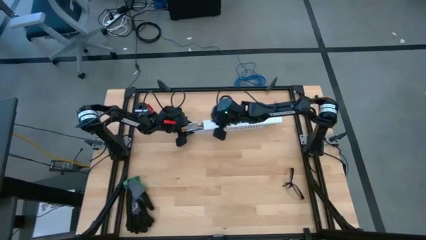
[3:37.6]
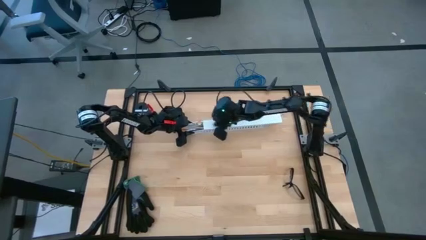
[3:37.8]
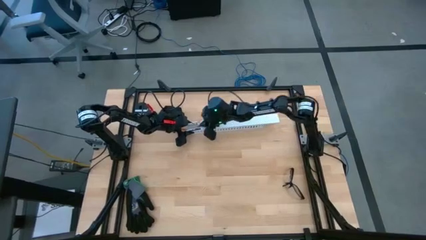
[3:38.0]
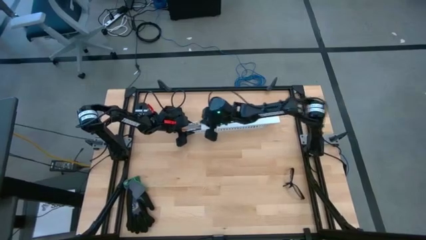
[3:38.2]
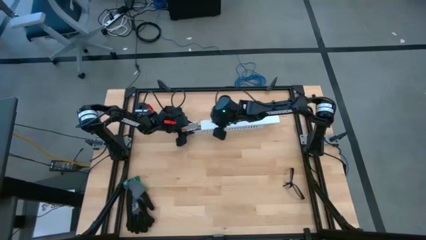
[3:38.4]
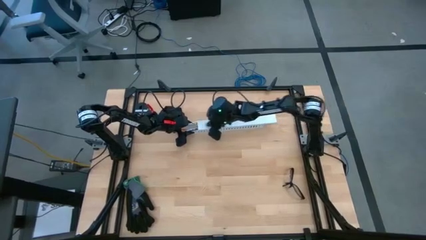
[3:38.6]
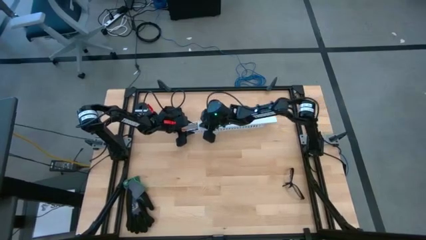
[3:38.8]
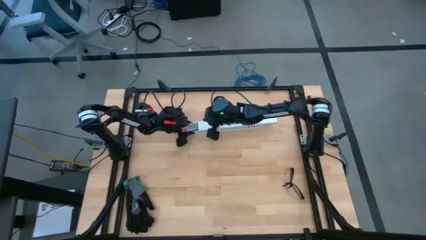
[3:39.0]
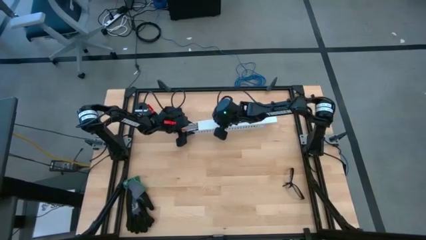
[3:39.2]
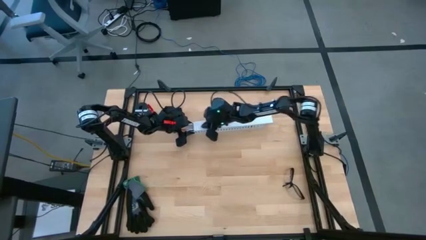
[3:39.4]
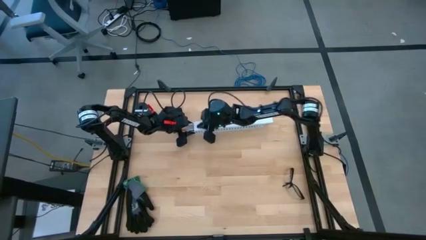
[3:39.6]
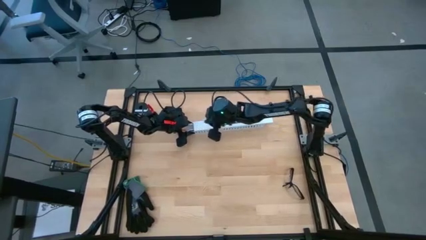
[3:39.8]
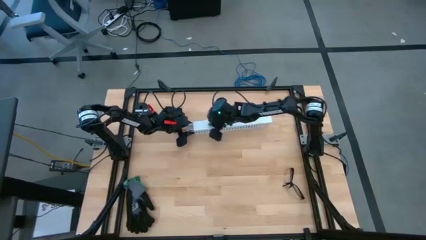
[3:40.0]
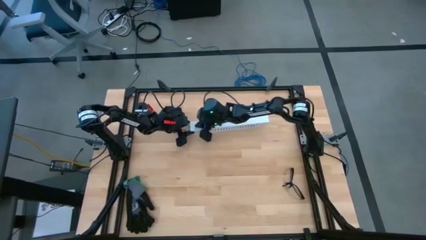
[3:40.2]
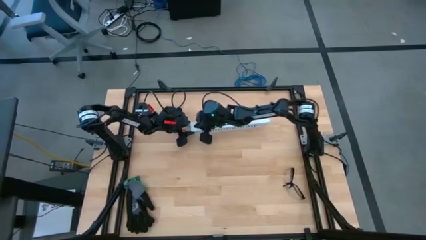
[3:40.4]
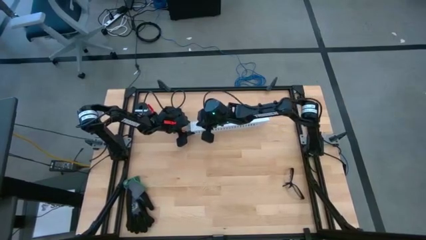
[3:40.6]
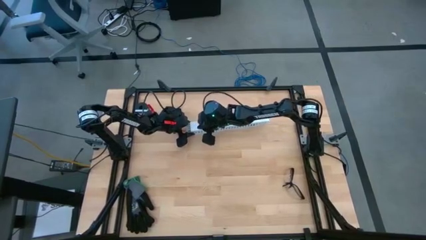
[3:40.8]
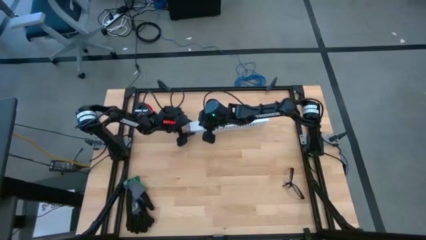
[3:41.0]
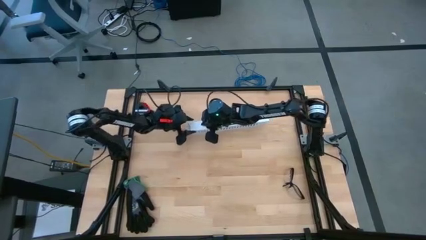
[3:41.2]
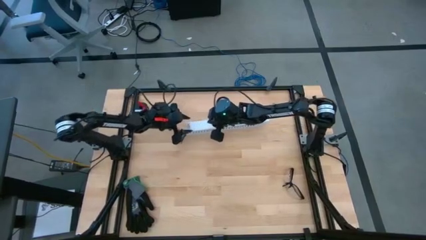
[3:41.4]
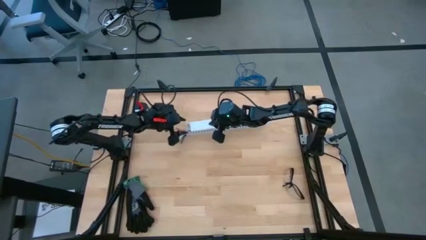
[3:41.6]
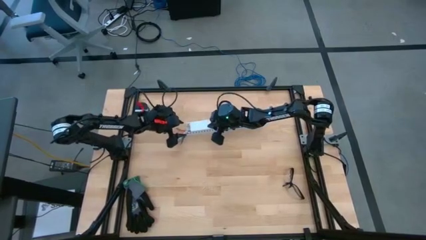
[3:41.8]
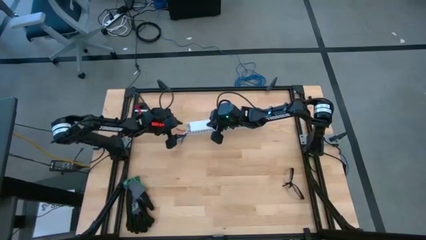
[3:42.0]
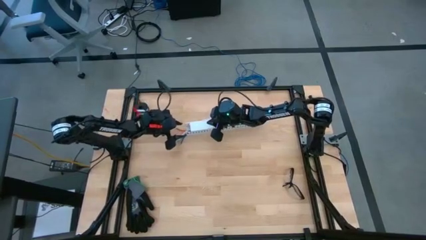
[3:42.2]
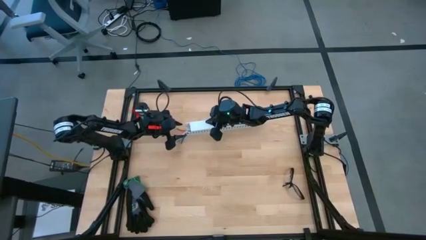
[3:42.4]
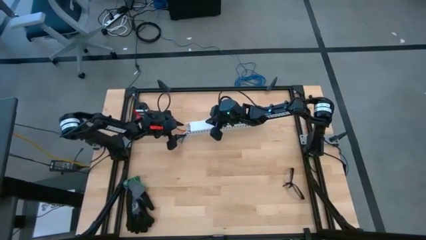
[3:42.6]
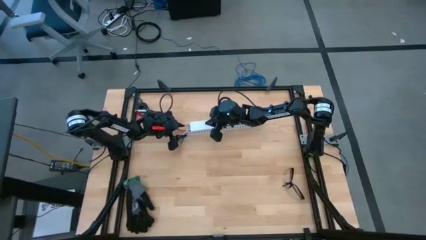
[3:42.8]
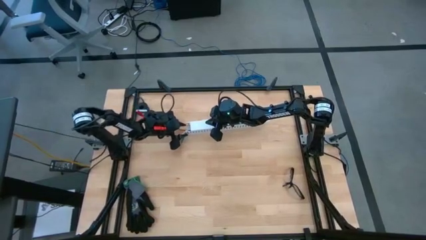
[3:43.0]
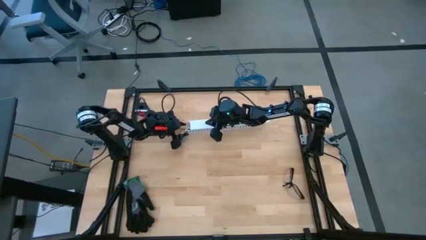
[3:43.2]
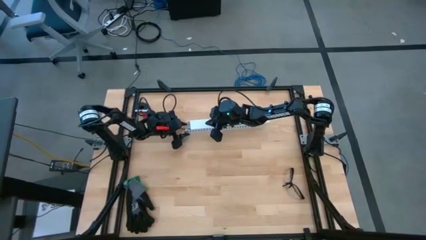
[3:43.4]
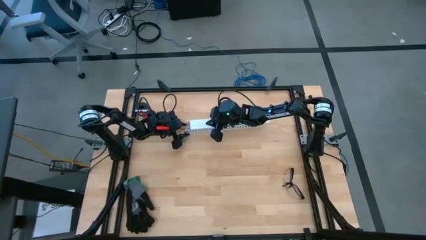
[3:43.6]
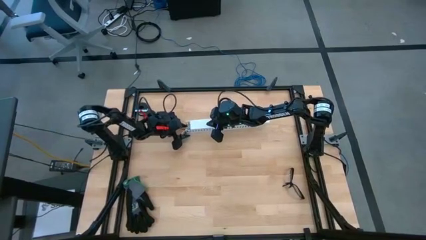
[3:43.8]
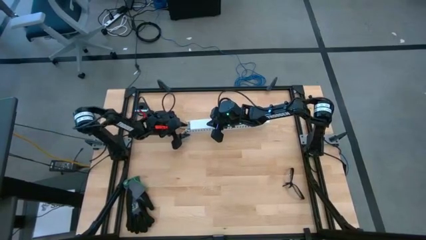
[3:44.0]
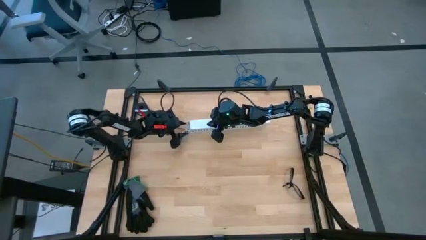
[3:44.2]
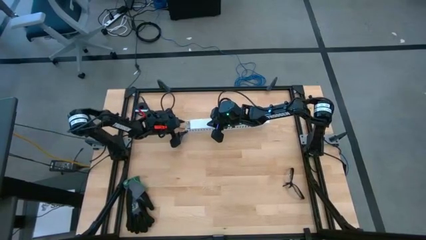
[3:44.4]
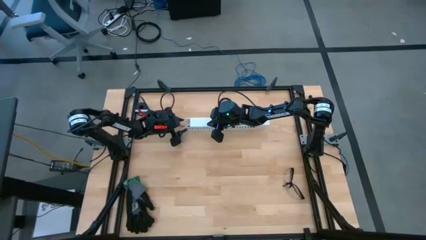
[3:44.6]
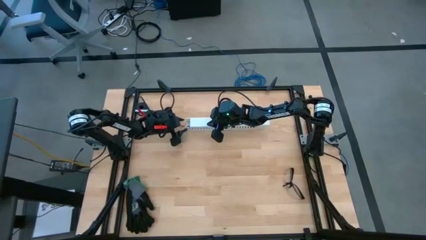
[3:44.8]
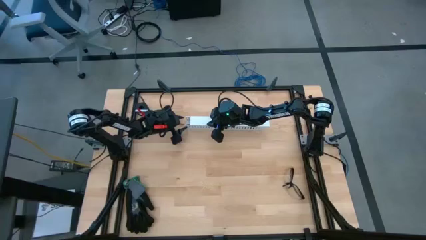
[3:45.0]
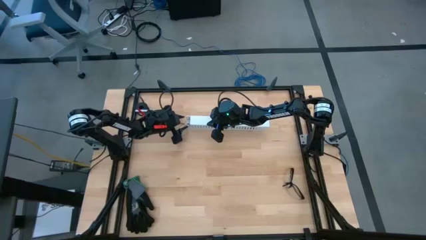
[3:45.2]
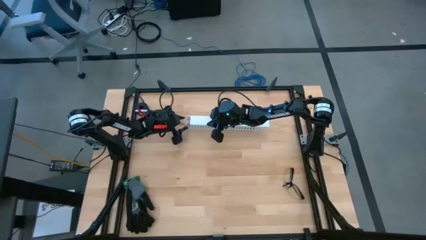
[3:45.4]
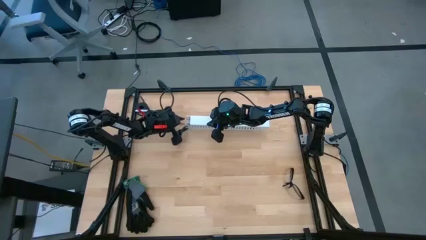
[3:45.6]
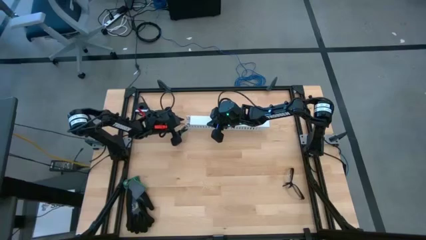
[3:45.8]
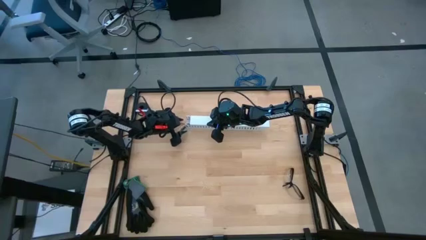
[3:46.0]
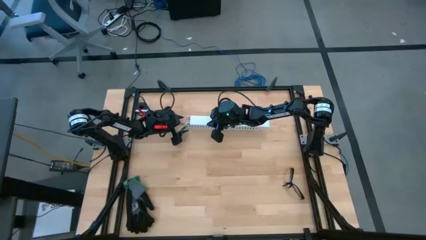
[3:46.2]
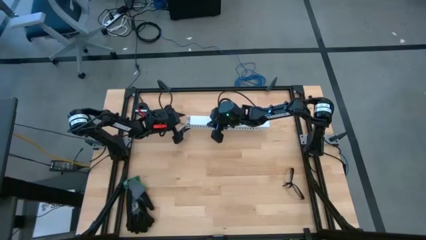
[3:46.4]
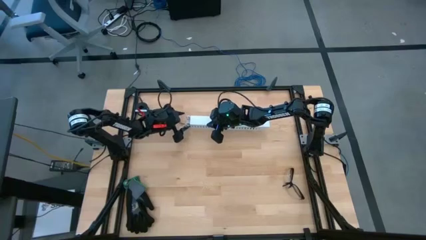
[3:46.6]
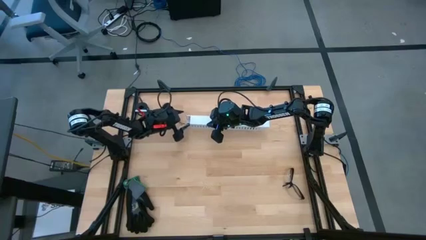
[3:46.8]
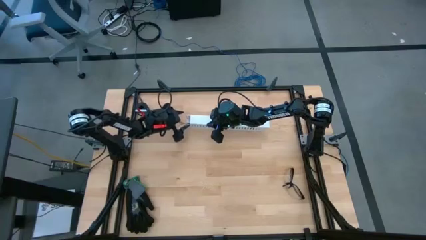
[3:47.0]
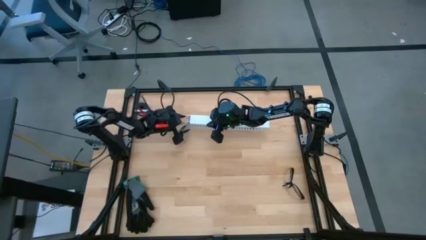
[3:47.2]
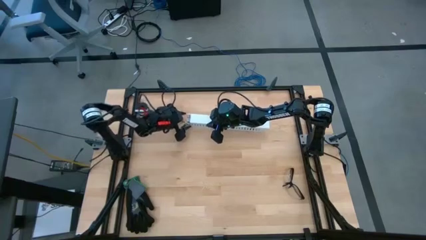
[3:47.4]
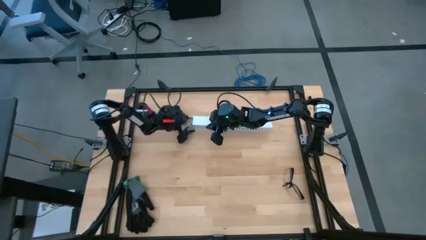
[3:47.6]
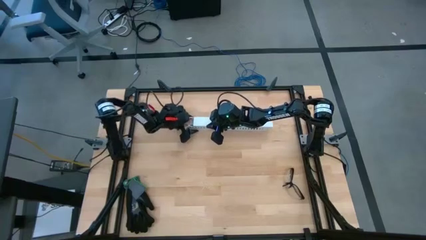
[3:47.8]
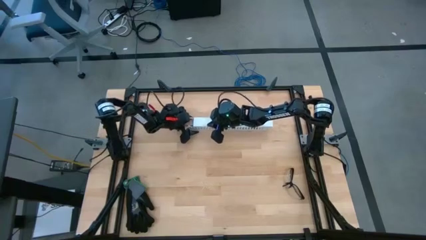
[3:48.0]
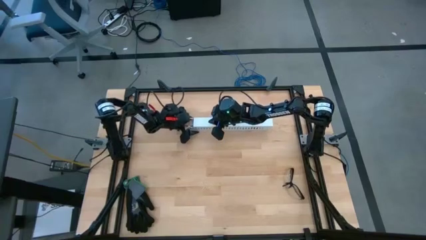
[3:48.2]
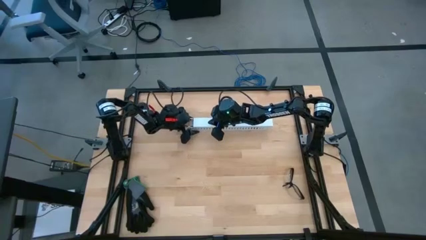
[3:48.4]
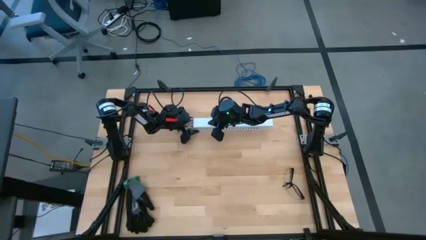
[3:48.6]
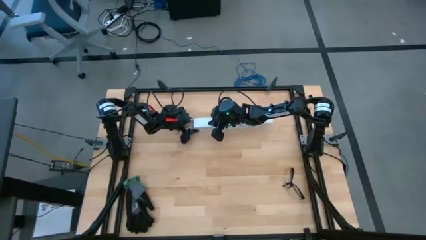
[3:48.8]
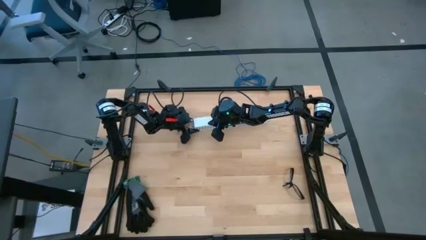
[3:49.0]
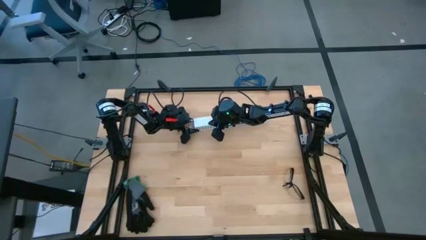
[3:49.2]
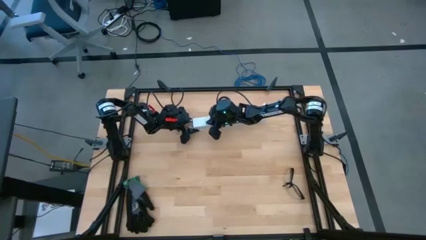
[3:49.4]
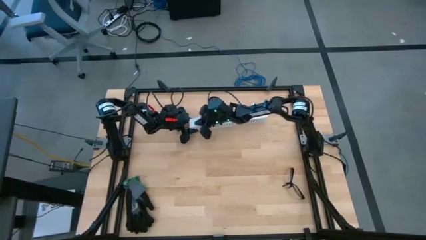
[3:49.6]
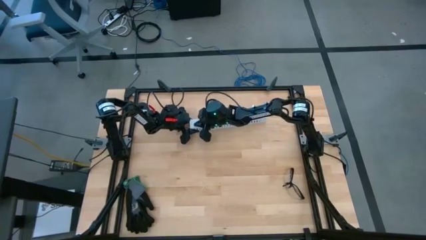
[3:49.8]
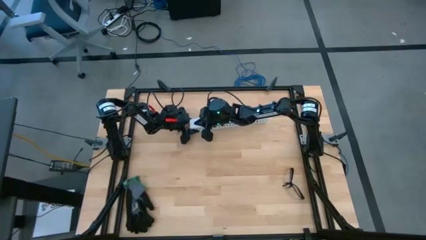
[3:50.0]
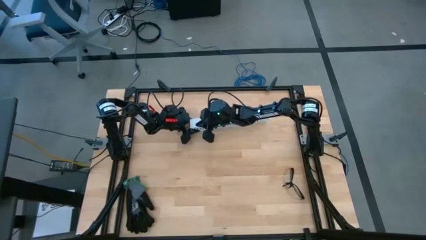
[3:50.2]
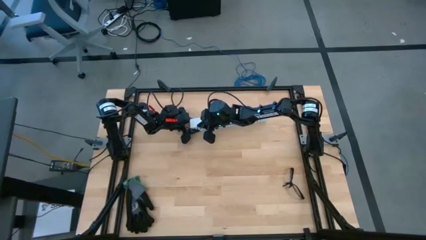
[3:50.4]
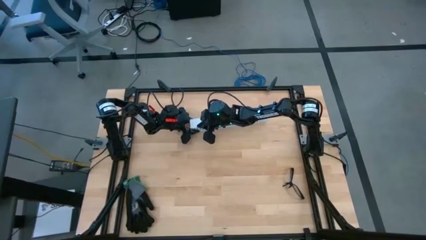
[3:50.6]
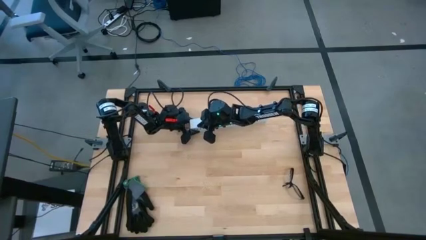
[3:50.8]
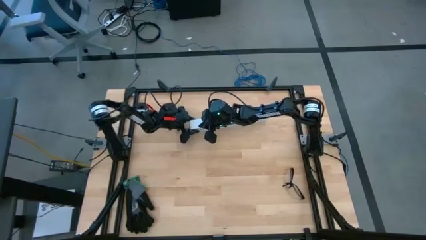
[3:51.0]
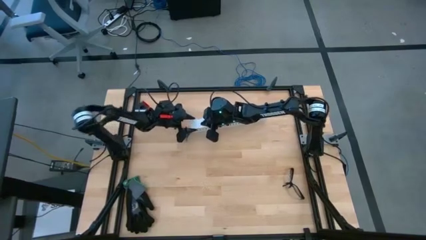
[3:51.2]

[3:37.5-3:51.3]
Task: Ziptie cables
Close the white cable duct

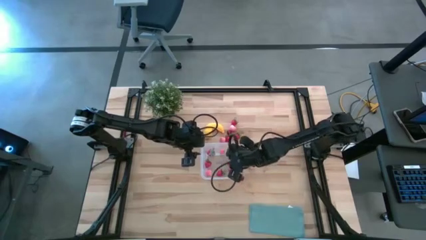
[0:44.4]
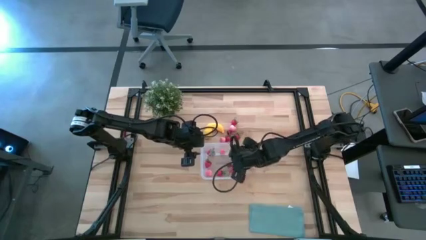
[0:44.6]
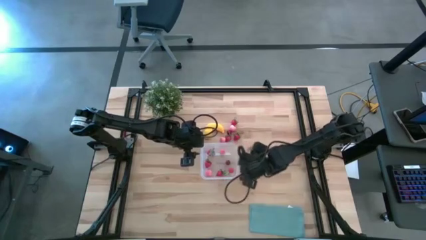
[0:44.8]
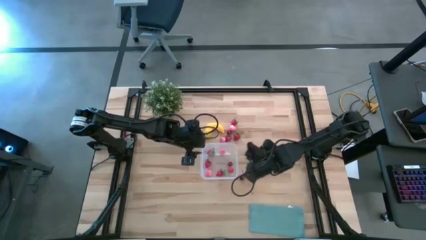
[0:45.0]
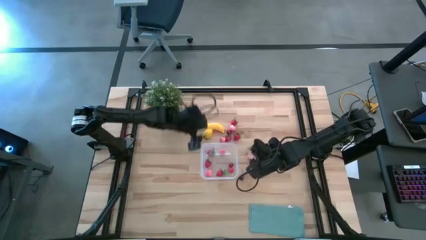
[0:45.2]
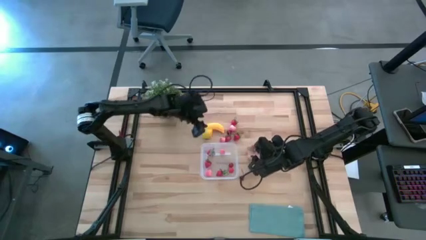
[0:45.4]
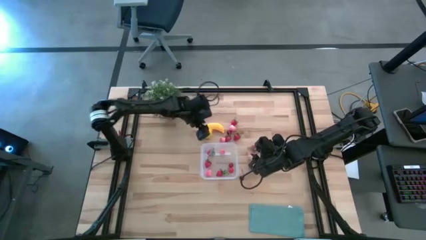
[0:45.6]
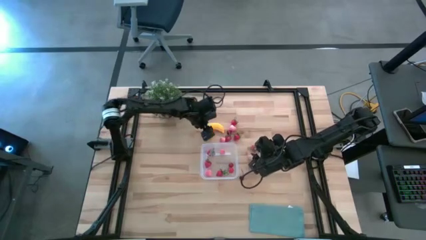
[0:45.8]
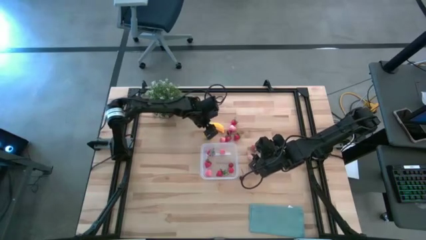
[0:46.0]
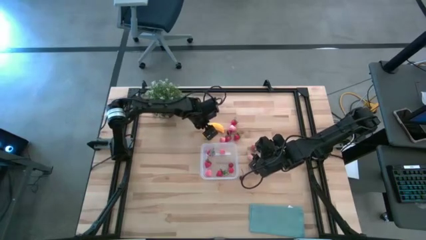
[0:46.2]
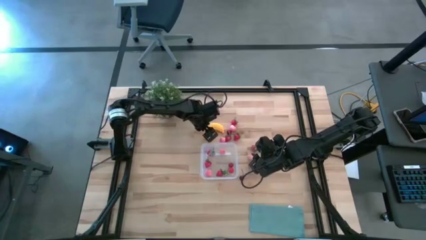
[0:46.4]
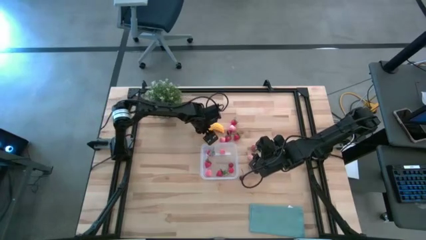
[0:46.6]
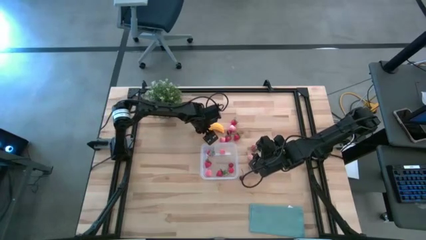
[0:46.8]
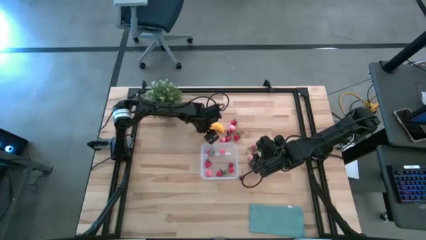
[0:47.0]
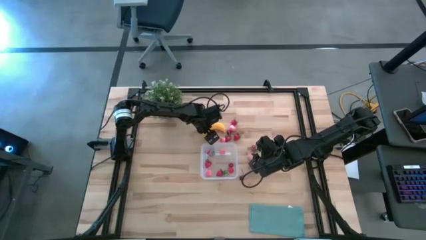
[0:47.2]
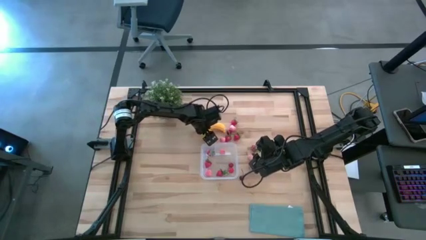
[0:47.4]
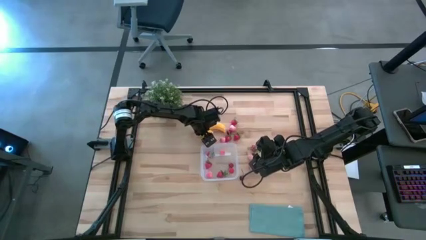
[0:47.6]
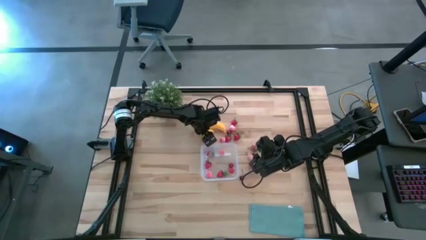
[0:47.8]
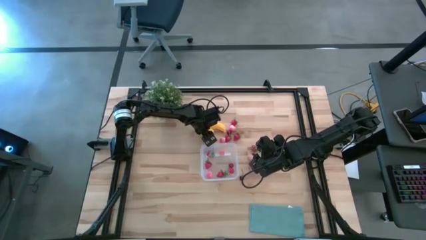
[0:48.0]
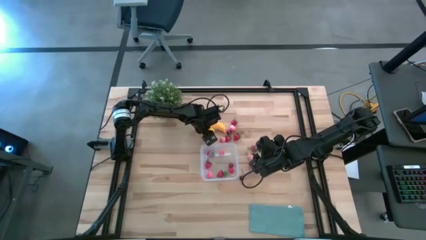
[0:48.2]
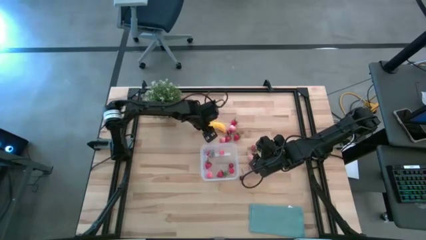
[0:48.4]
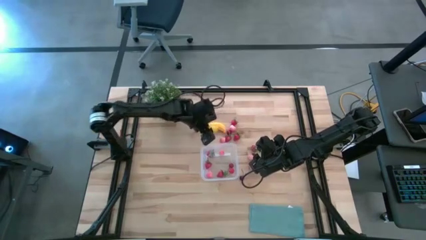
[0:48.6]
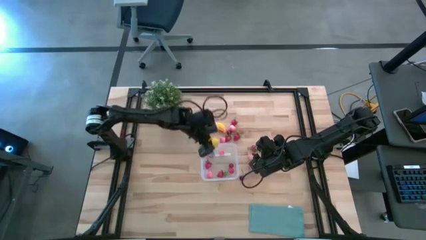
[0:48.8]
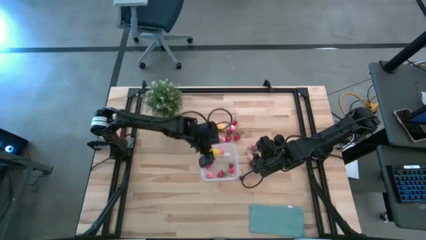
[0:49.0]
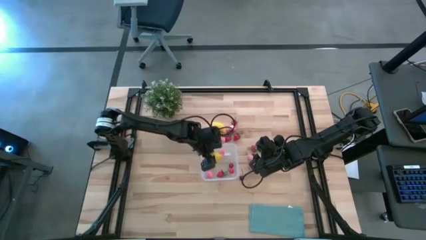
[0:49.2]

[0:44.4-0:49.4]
Task: Pick and placing Produce into tupperware
Put the yellow lemon into the transparent container
